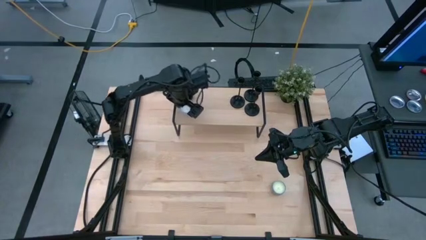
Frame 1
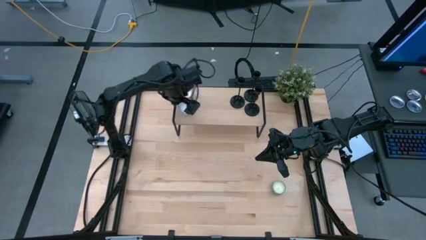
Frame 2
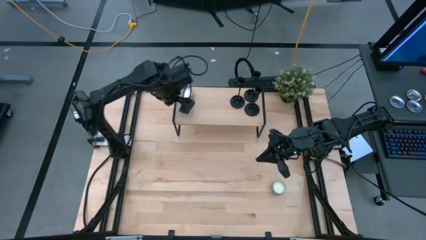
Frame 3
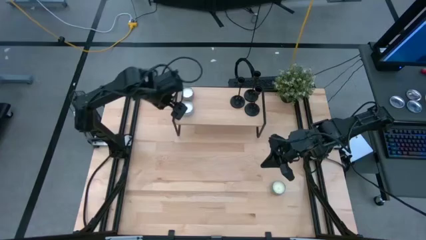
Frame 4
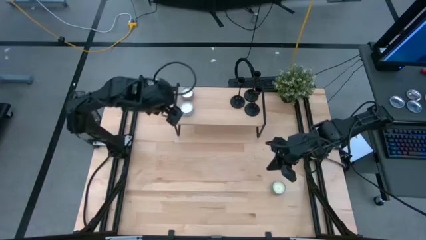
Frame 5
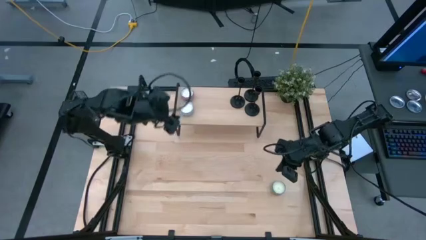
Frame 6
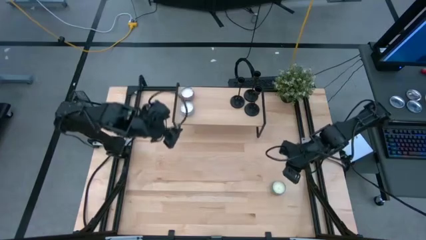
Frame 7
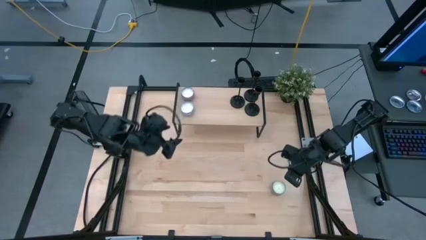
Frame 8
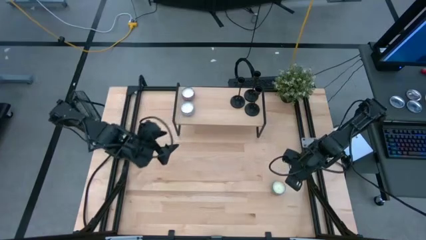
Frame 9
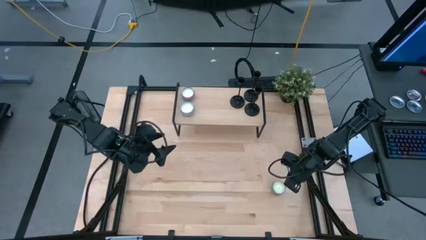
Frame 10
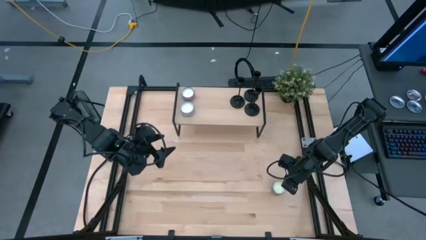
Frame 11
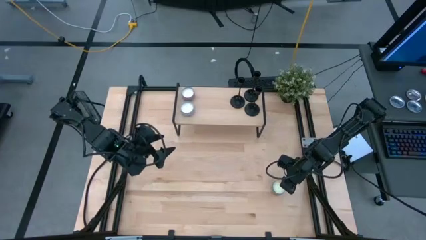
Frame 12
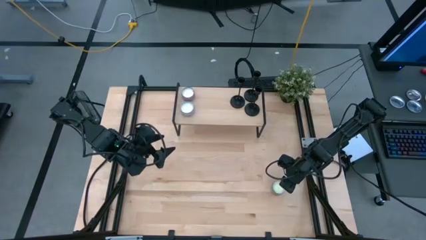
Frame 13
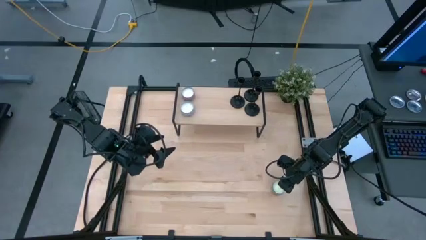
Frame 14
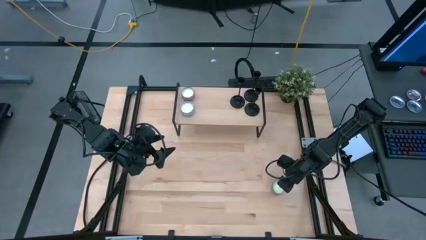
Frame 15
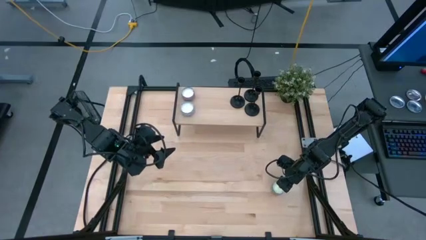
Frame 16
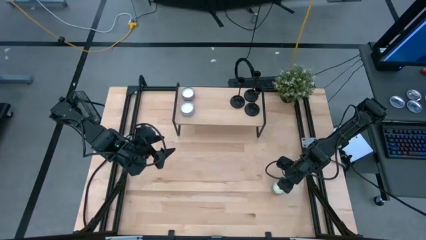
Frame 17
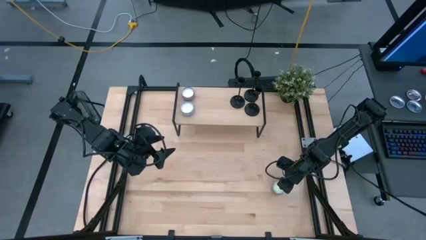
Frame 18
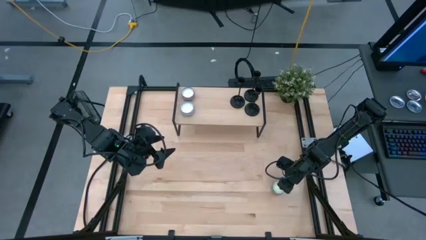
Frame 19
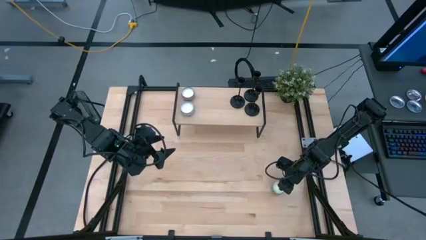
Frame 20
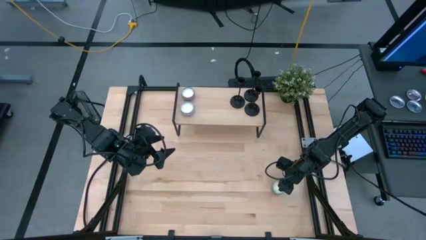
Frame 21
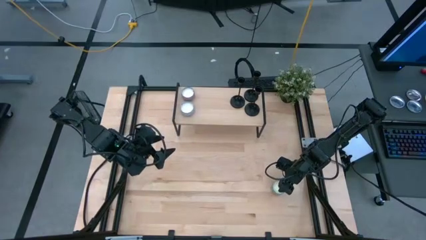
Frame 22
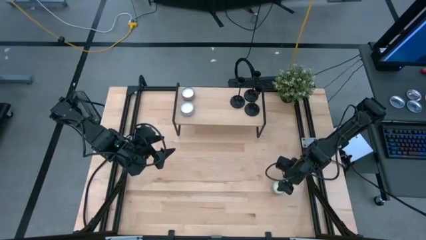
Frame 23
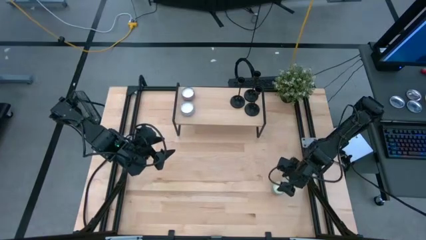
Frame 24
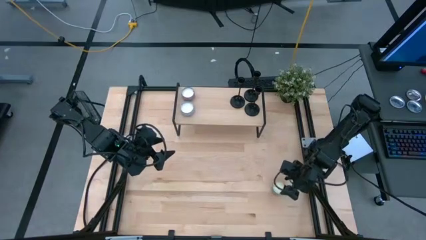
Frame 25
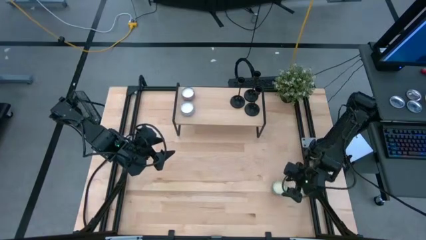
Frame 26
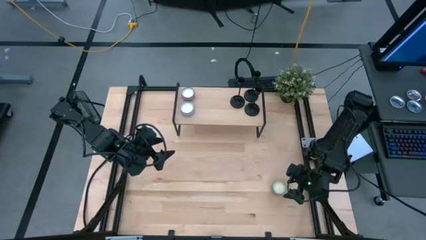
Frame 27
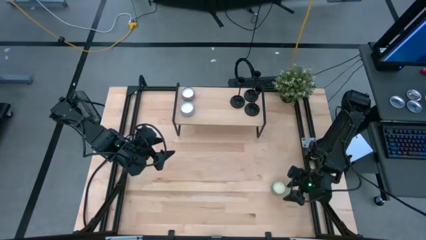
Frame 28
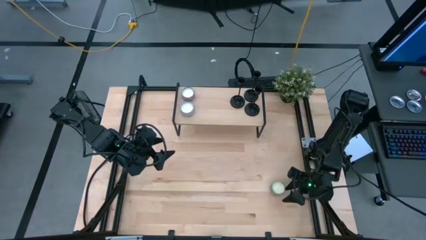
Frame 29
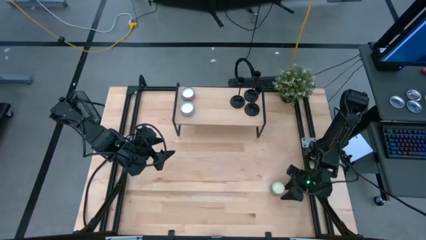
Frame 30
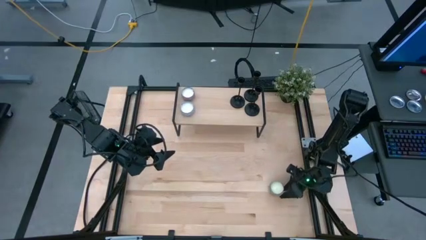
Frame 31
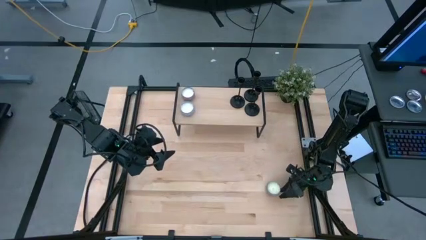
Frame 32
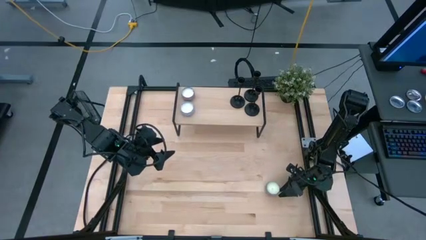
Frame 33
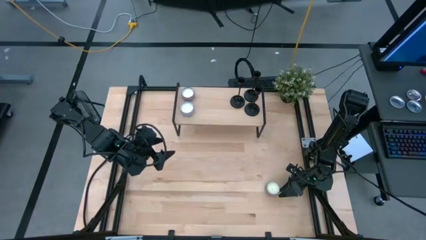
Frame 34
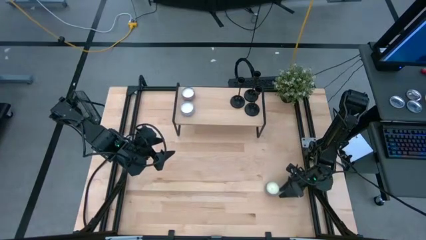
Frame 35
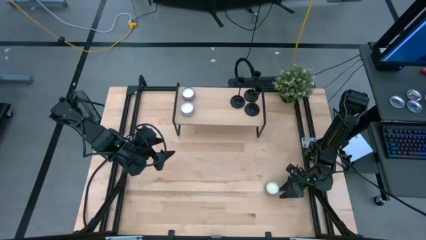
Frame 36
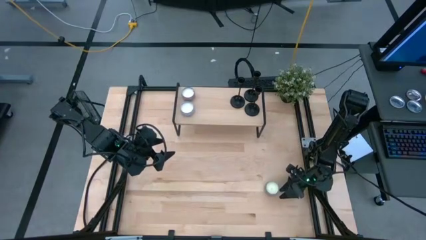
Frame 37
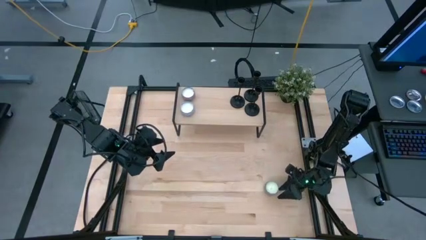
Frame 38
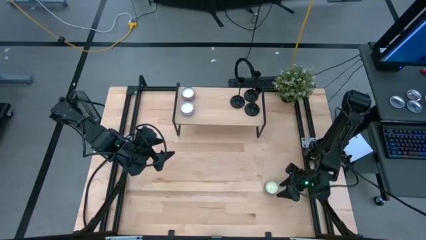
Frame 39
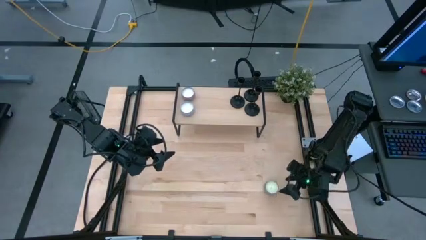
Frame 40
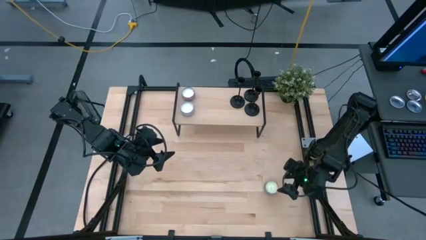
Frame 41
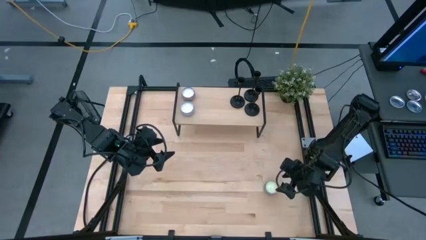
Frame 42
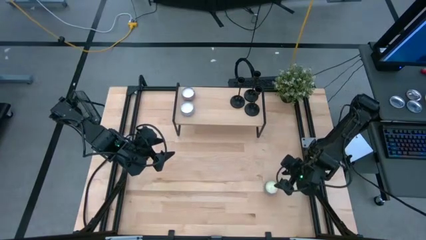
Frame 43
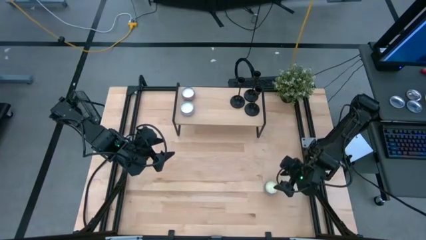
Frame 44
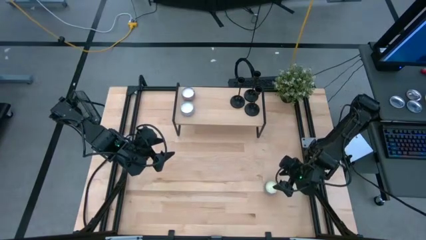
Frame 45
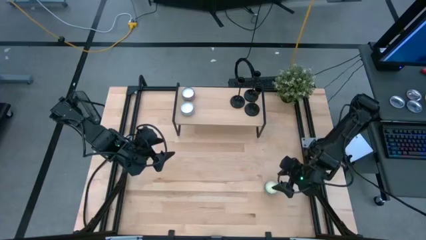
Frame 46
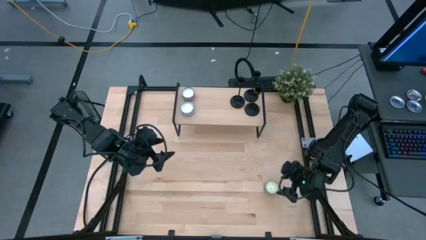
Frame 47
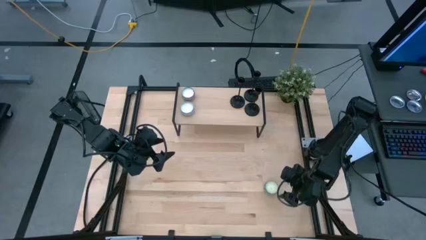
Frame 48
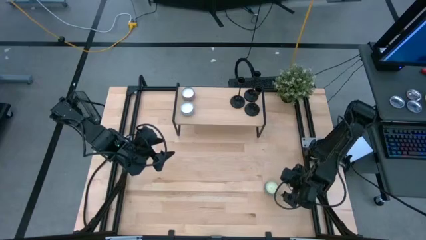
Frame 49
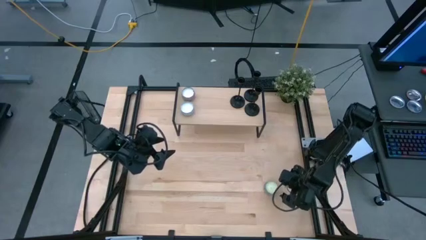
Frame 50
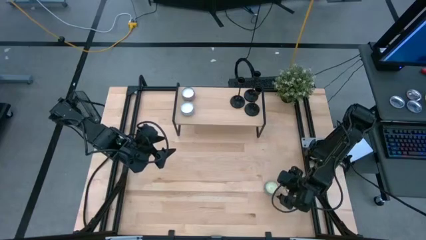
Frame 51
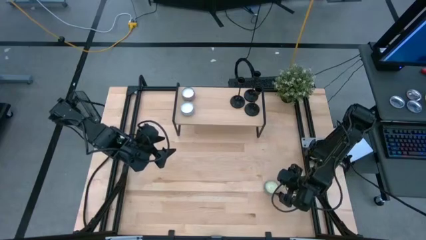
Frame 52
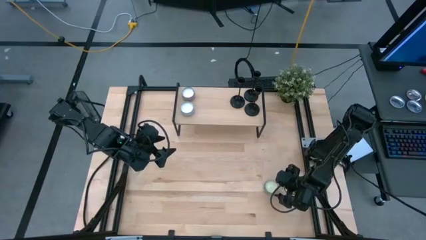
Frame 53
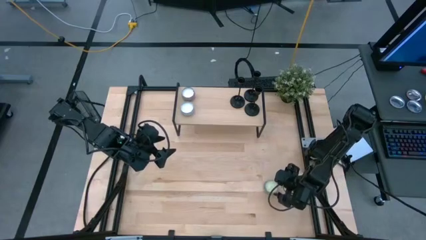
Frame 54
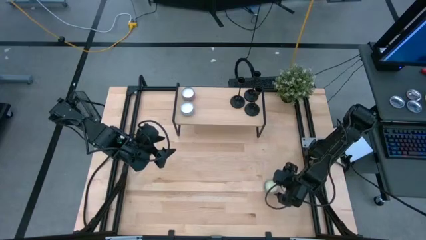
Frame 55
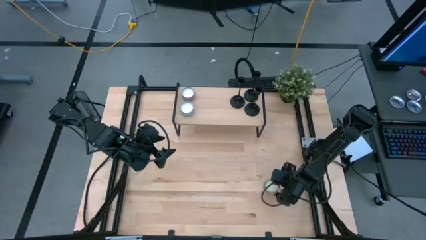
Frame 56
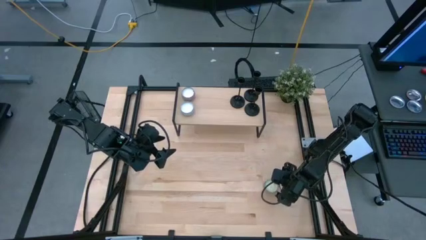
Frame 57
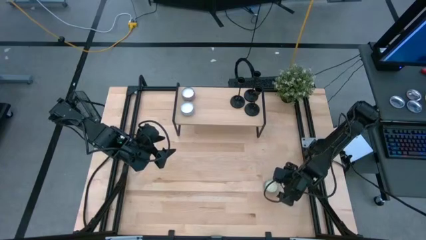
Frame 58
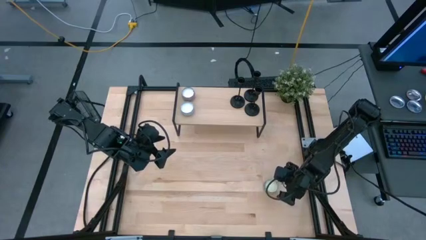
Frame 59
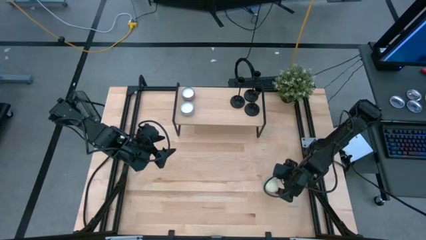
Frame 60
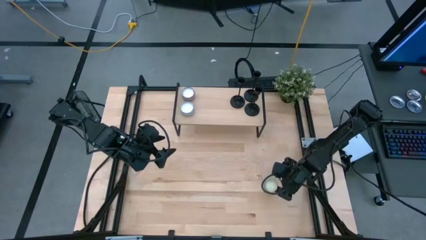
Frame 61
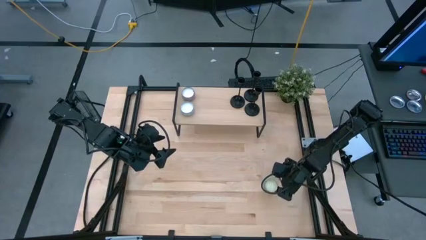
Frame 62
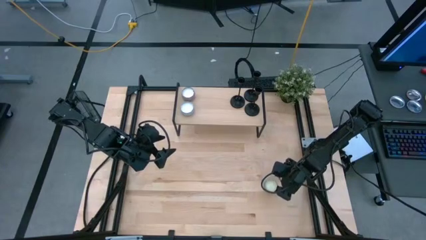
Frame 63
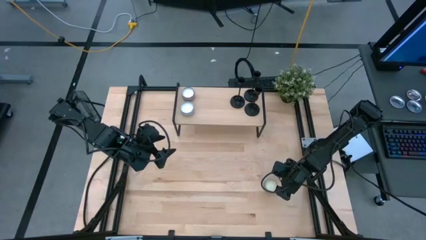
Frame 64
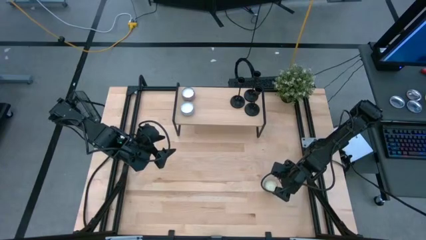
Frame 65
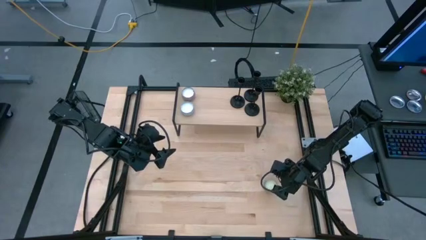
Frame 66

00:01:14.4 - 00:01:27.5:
Task: Pick & Place candle stick holders
Put the blue patterned scented candle on the shelf

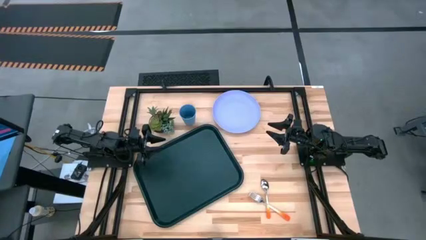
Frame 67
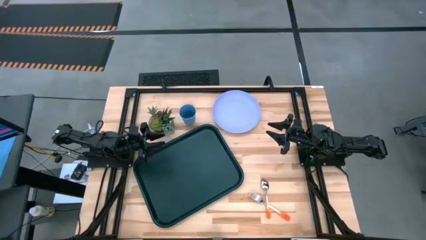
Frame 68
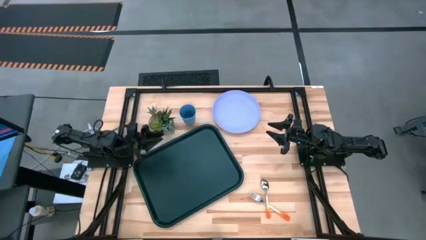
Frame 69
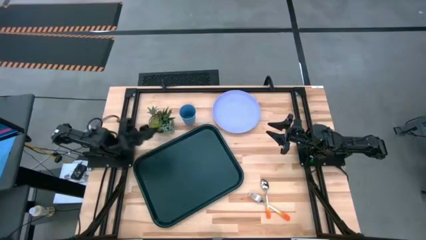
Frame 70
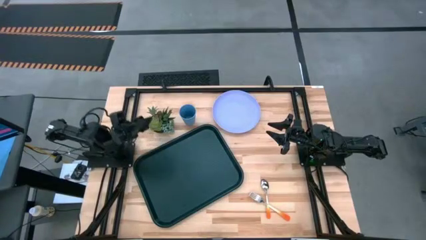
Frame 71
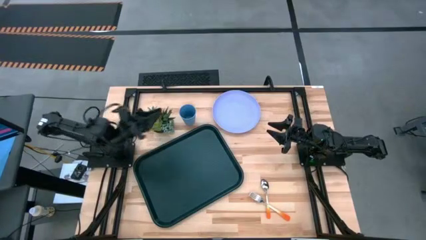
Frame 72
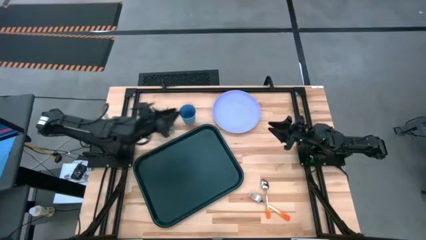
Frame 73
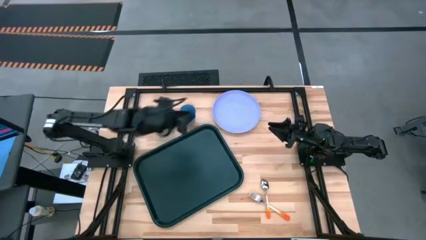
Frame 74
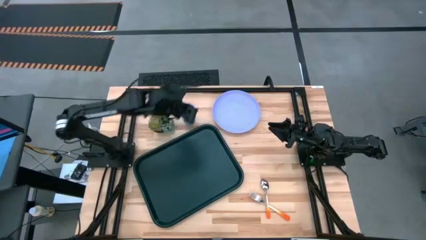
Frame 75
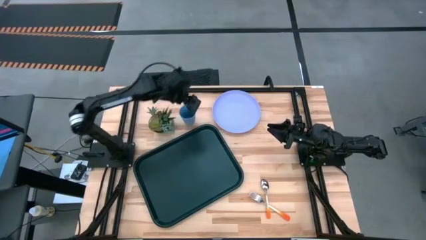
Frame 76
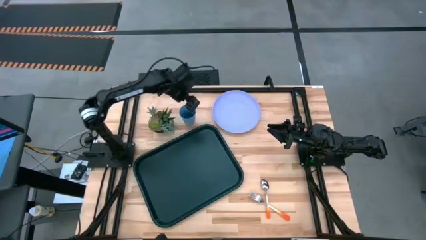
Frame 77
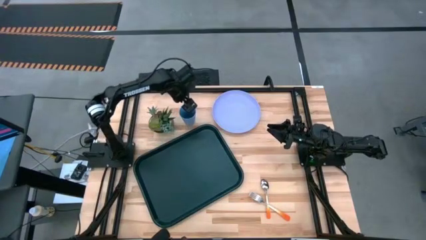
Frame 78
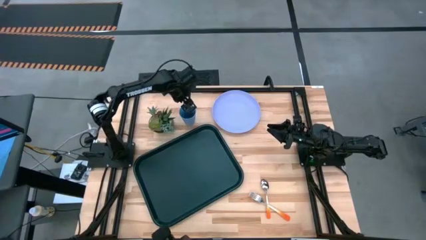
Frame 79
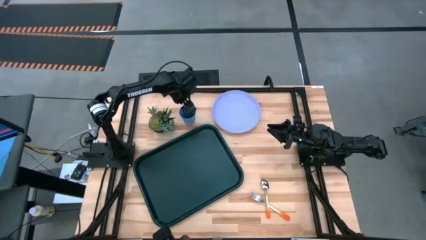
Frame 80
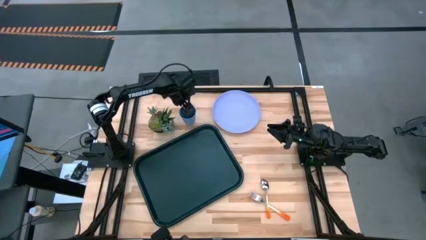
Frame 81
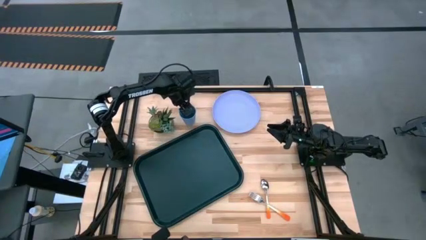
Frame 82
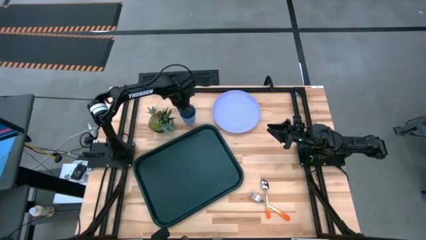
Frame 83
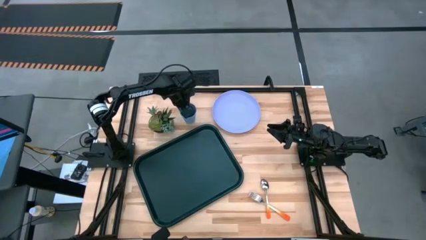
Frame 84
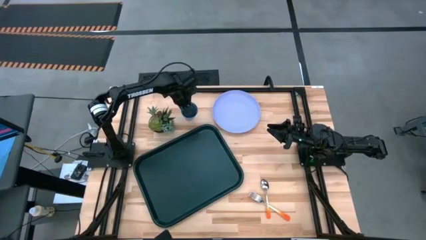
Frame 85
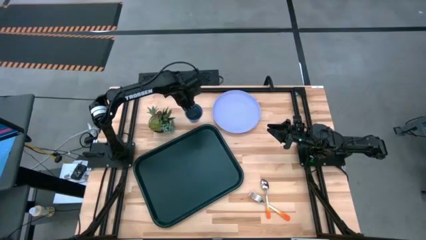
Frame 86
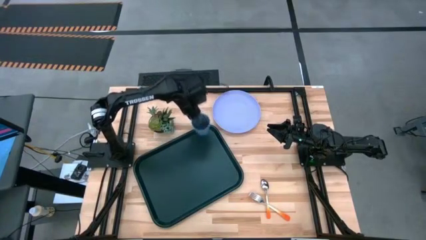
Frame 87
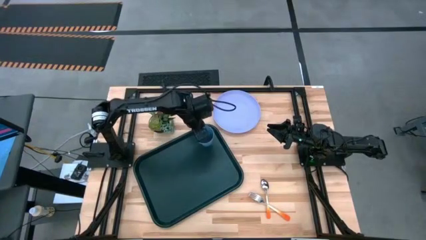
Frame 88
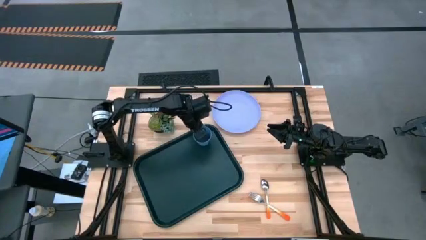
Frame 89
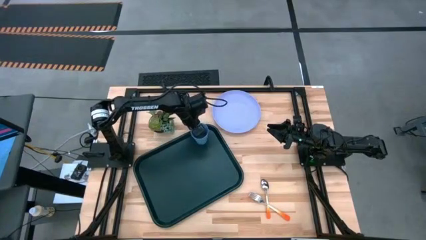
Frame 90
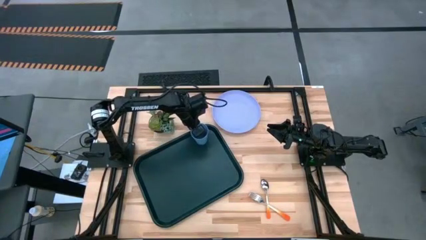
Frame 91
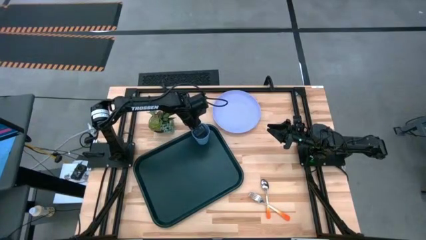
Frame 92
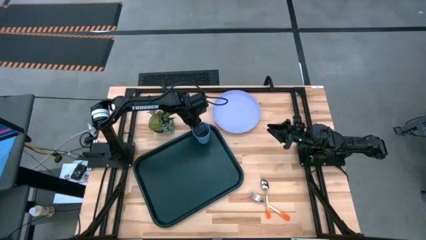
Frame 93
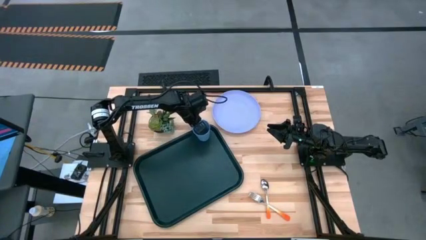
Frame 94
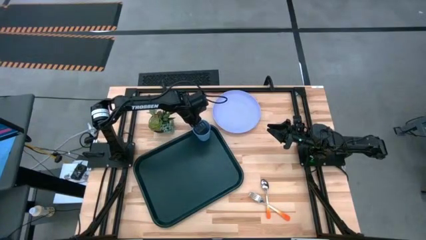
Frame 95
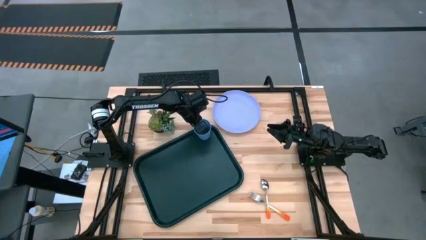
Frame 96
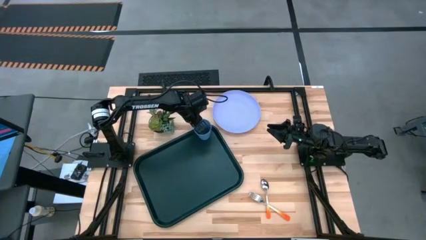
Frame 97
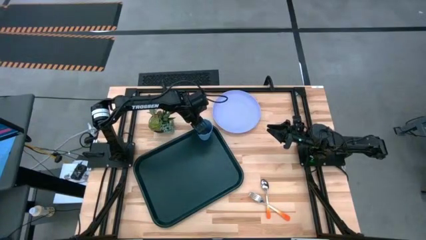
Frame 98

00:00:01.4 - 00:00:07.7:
Task: Pick and place plate/cup/fork/spoon on tray
Put the blue cup on the top right of the black serving tray
